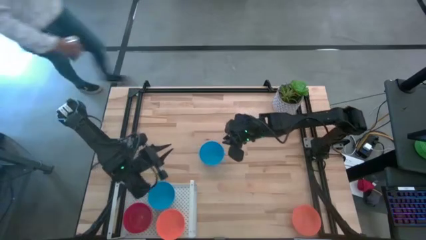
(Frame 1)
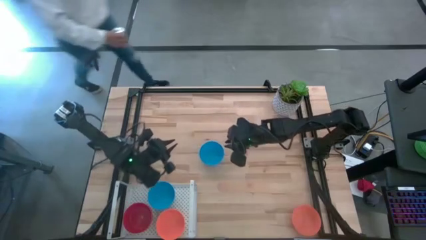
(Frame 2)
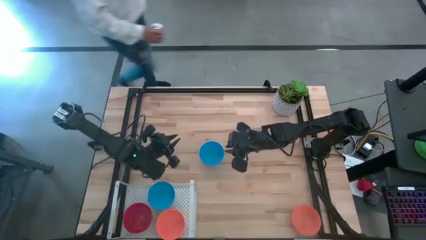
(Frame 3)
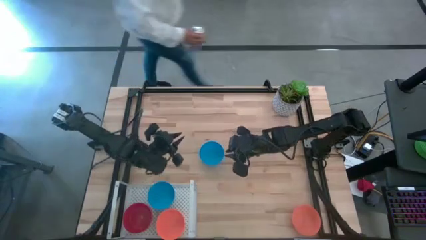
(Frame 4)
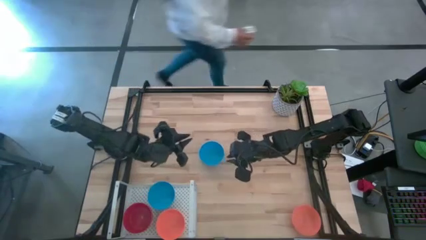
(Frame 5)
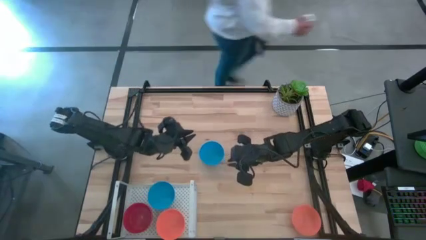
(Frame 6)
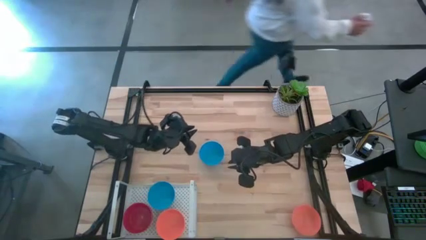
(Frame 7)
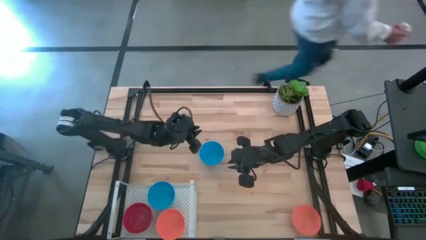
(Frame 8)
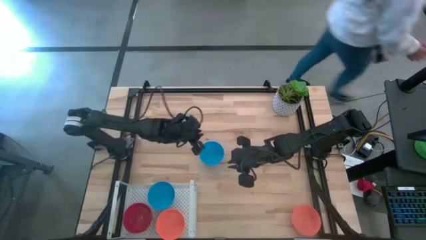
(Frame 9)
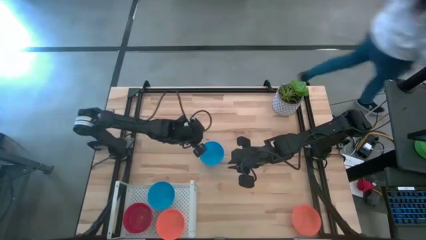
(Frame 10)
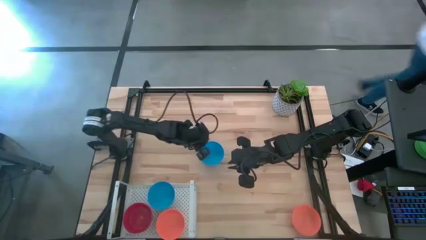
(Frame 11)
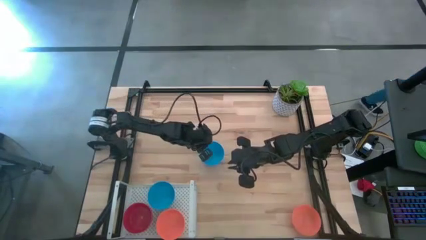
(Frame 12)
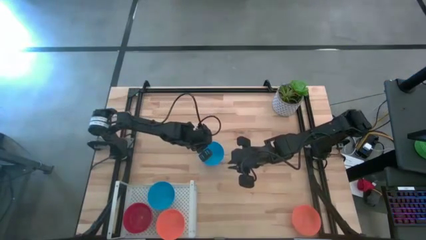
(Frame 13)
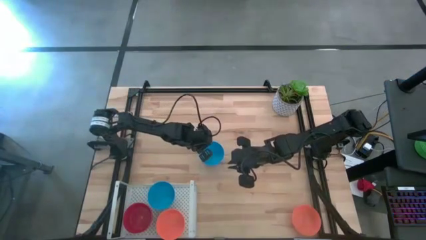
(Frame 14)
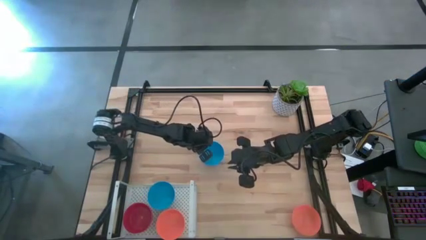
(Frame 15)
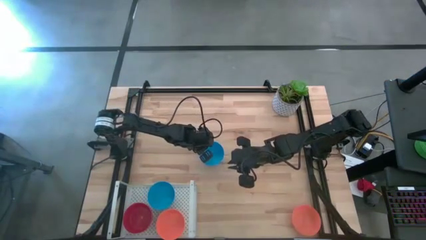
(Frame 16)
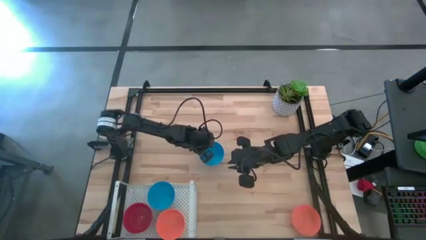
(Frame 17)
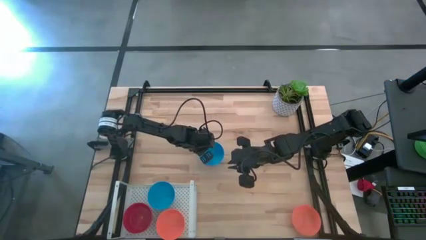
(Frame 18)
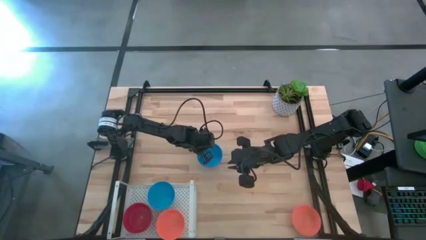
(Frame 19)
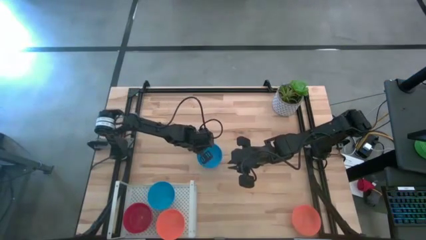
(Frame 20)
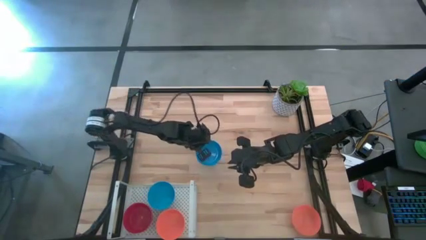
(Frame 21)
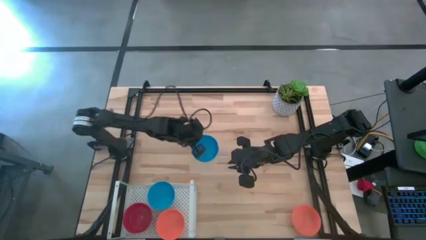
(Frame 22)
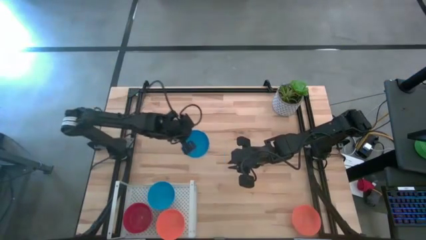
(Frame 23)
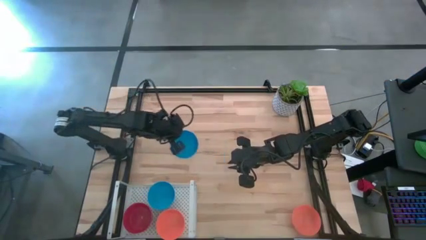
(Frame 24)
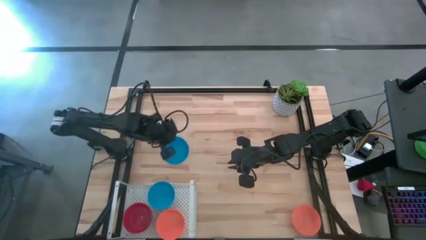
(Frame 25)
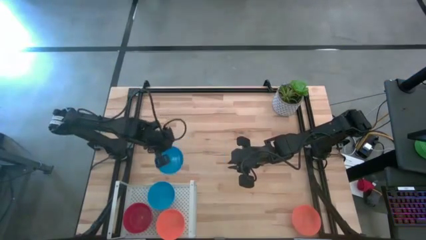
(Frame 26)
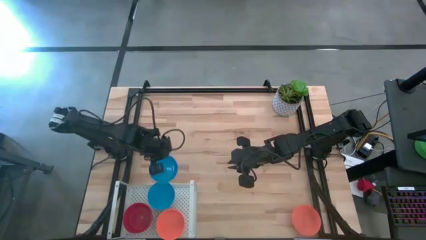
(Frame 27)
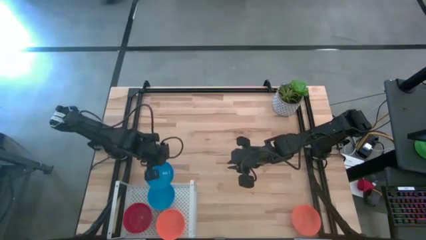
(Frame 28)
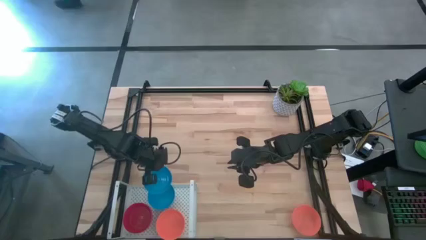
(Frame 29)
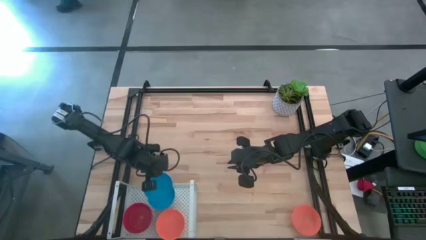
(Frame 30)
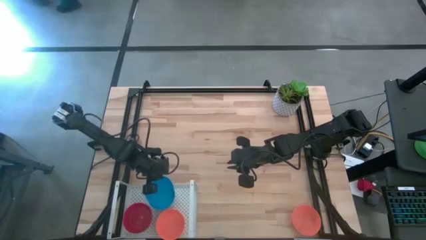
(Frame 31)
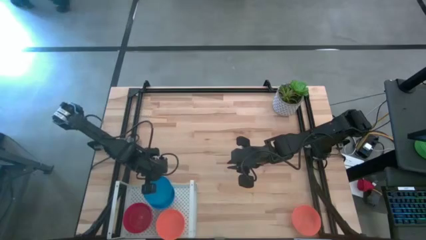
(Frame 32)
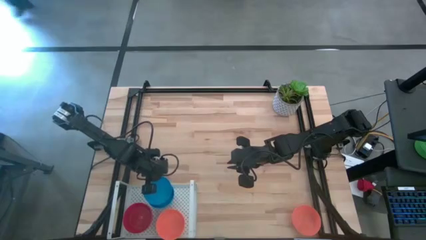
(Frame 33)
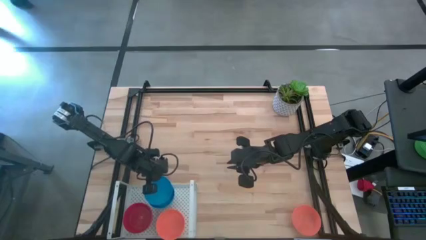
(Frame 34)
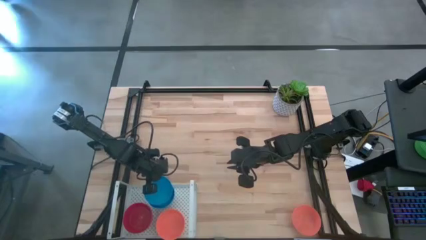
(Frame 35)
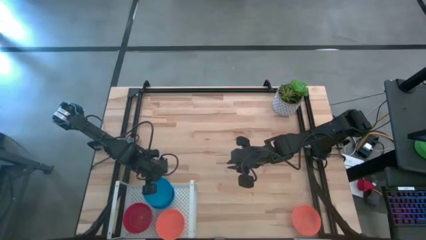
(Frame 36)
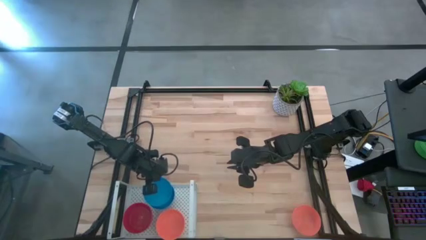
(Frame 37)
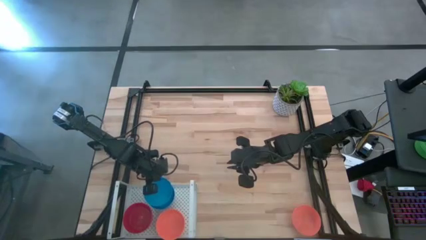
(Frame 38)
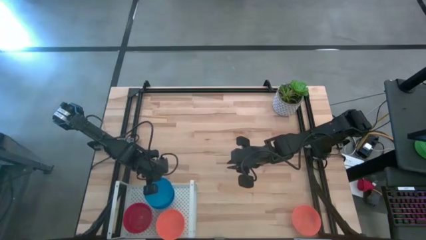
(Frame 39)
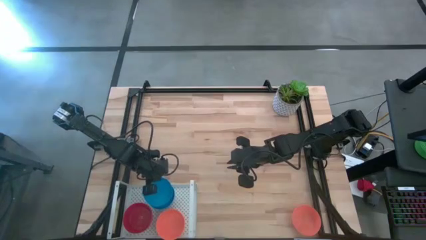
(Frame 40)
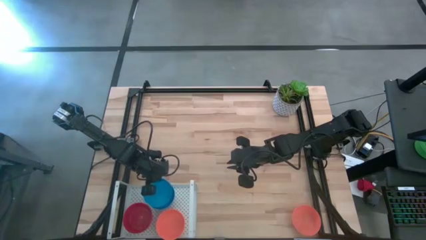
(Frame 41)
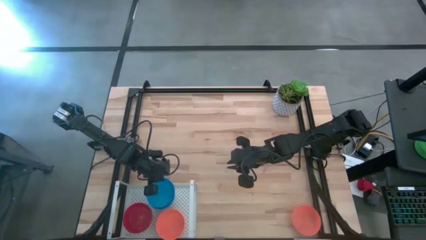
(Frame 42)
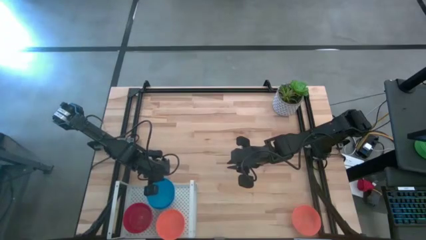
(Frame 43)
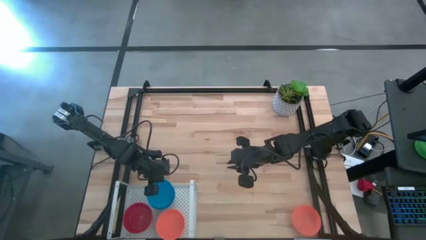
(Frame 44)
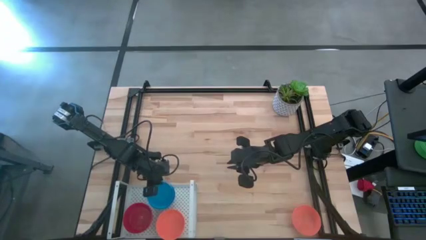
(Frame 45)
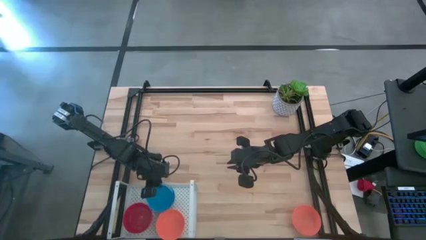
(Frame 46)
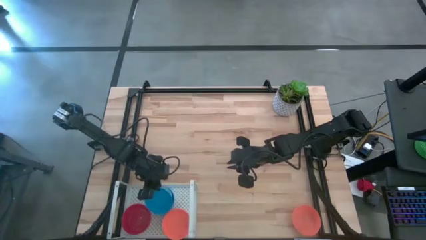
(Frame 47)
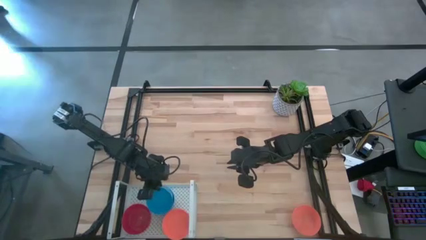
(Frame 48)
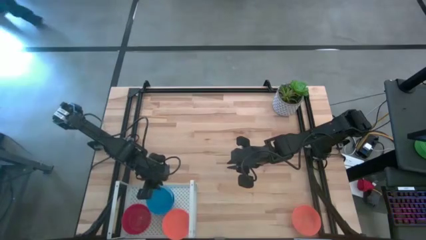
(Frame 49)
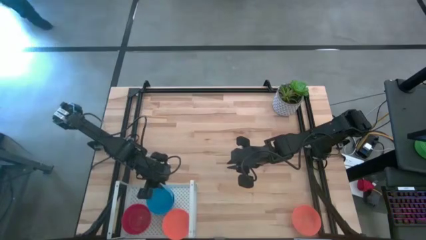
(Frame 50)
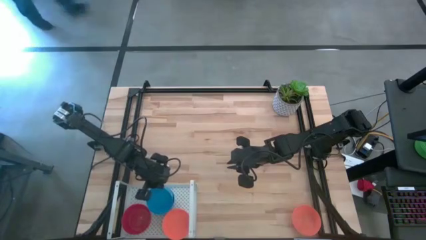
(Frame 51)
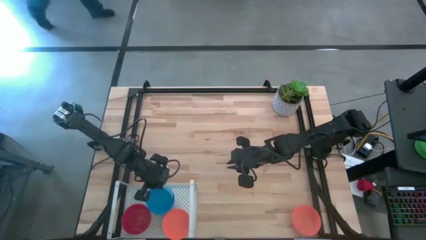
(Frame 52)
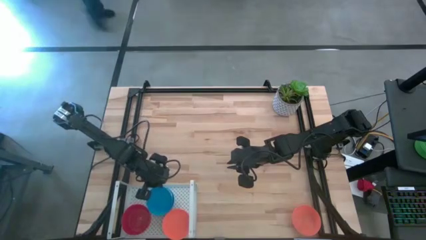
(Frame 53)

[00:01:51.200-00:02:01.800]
Task: Pick & Place Mini bowls
Stack the blue bowl on top of the blue bowl on the shelf

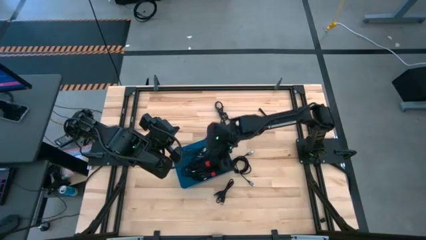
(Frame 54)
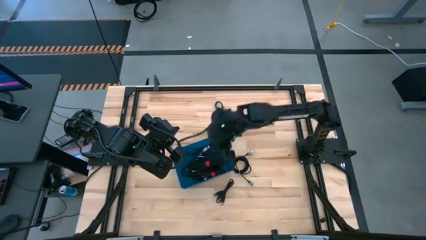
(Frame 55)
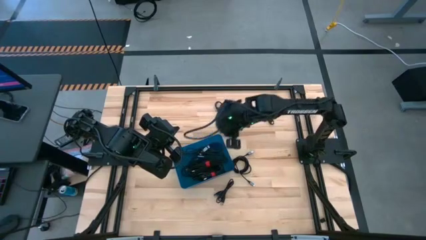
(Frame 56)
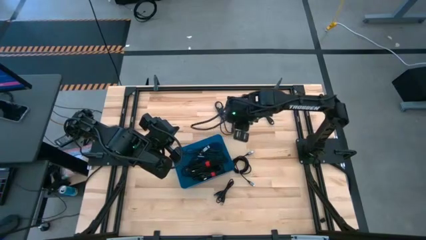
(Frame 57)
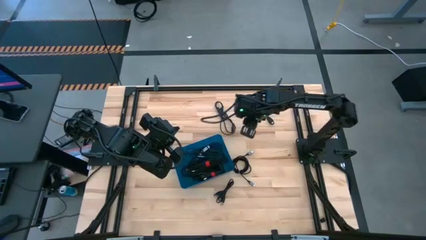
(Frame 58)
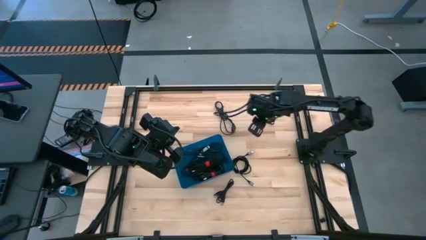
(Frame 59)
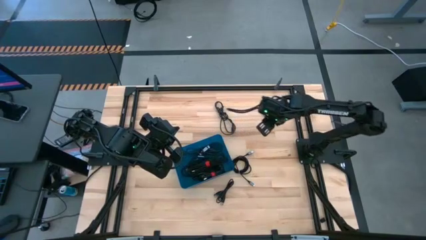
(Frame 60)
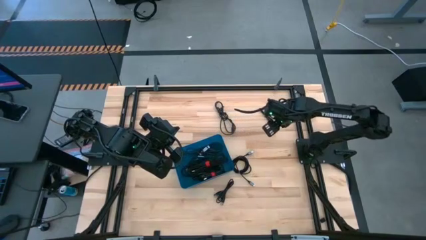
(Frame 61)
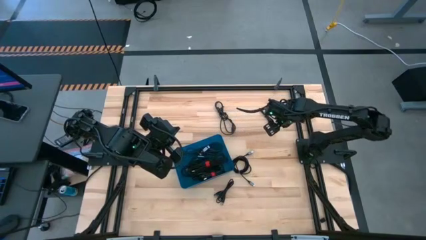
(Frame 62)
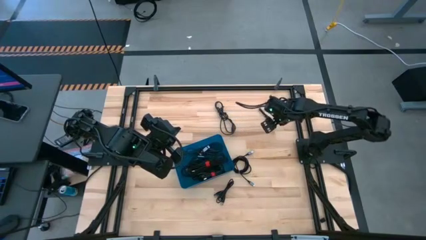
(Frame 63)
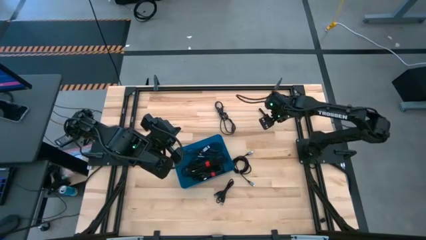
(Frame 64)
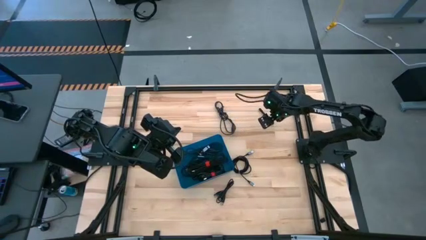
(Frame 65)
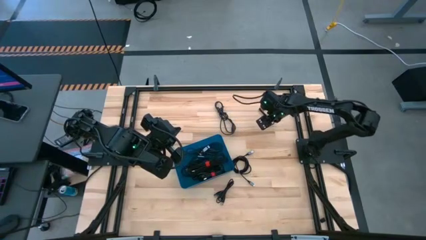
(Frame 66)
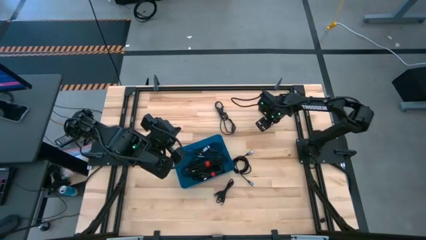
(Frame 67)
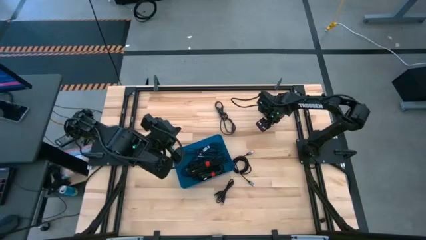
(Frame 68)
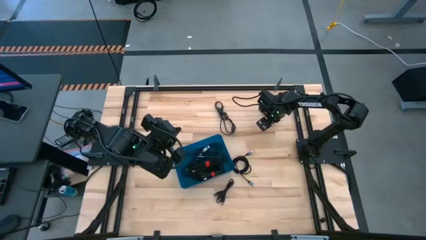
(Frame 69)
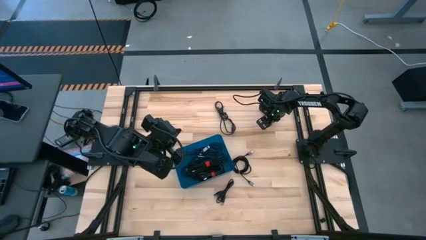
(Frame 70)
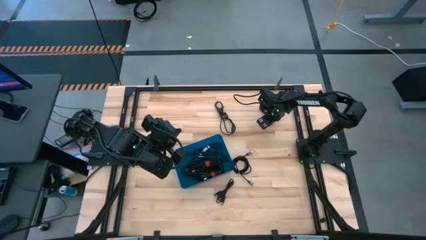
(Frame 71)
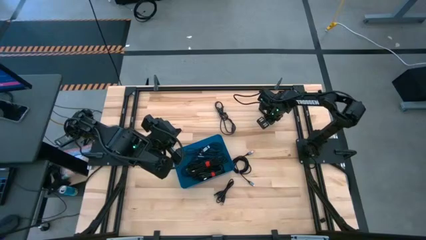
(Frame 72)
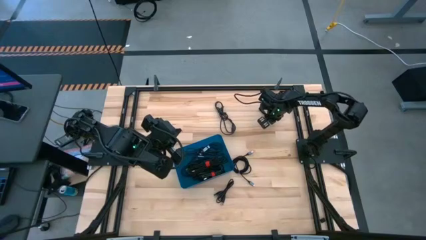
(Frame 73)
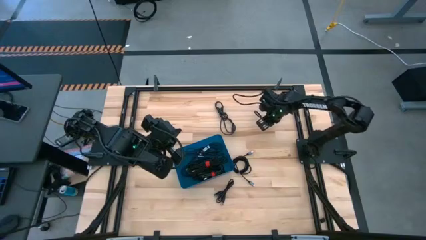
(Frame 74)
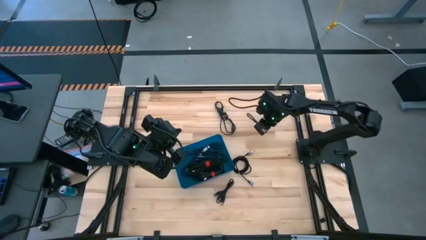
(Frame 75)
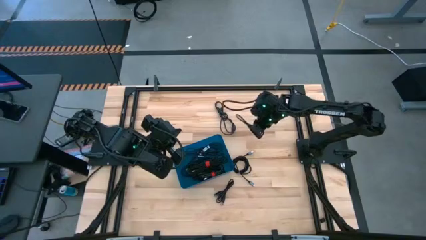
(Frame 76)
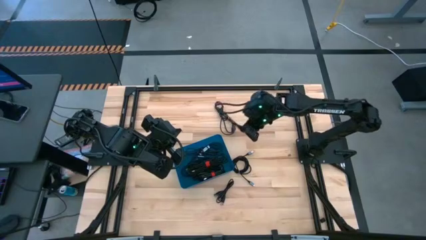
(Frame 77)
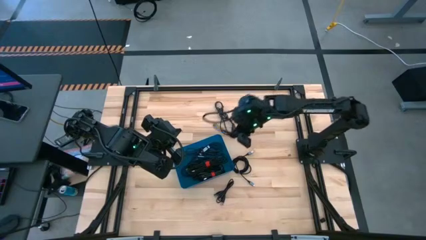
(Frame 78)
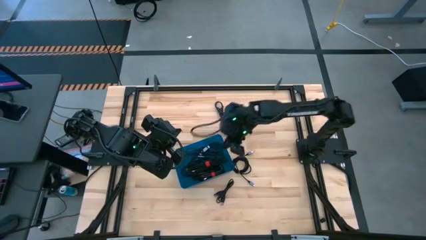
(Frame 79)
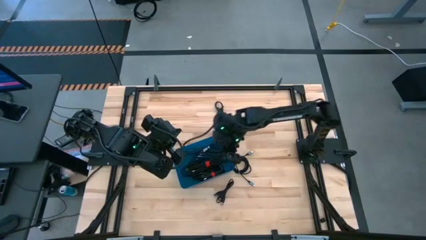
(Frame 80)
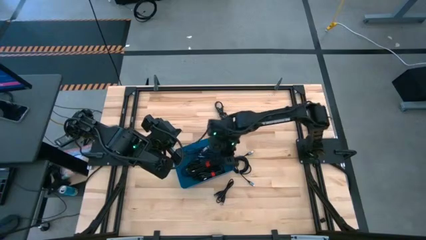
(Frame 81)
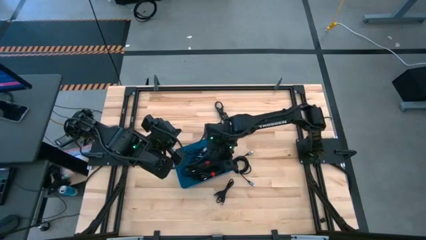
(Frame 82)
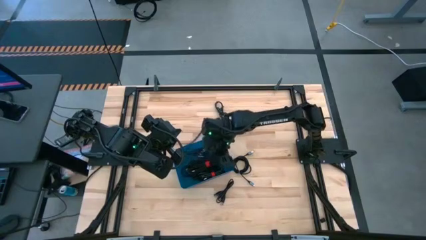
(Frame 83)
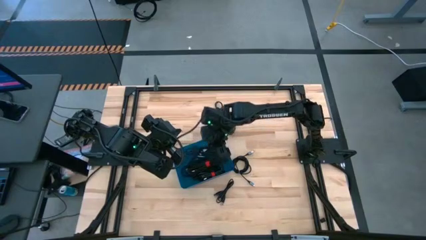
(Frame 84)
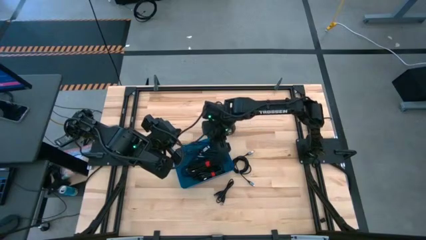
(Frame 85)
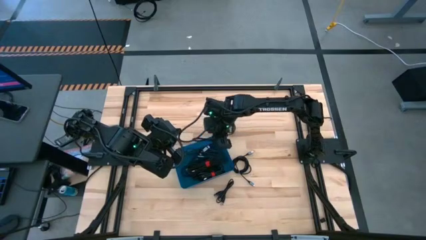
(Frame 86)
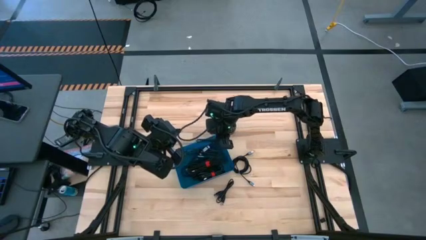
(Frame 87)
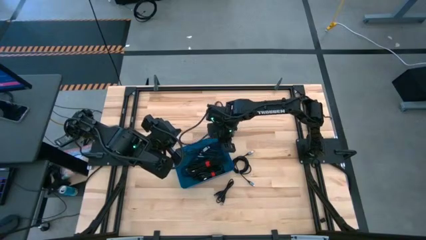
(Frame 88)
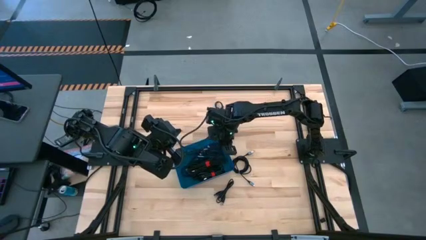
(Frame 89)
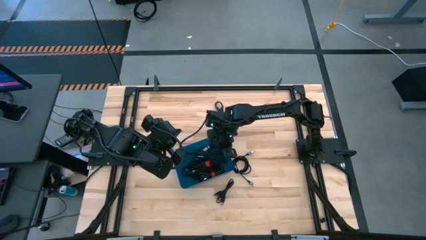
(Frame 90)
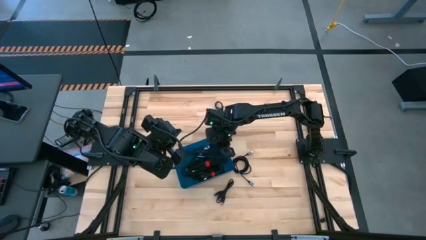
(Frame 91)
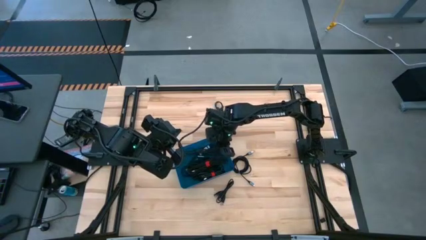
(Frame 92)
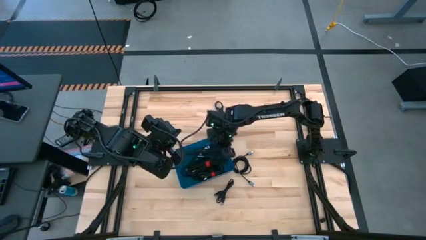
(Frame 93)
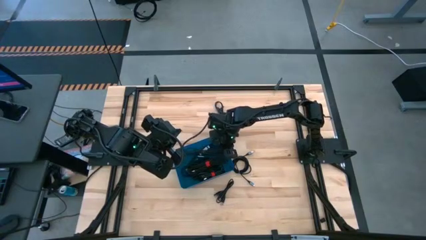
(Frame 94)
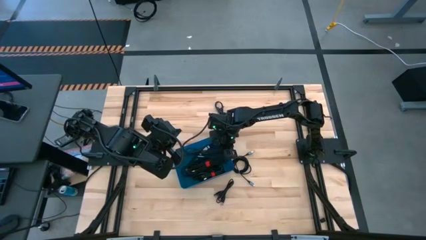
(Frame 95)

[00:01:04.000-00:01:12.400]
Task: Pick and place USB-C Cables
Put the black charger cable into the blue bin
